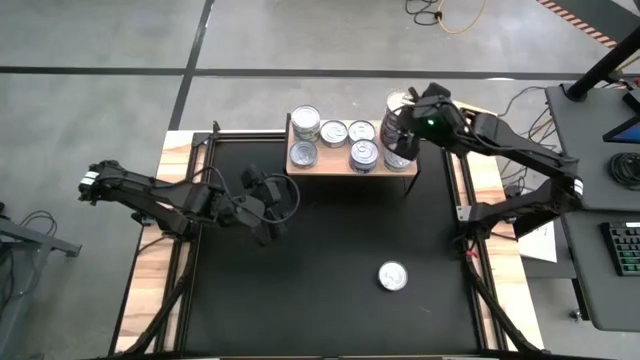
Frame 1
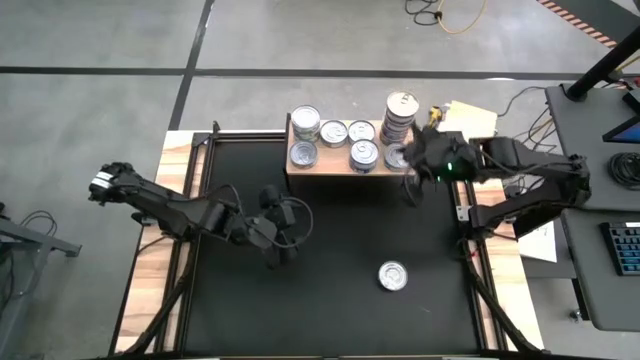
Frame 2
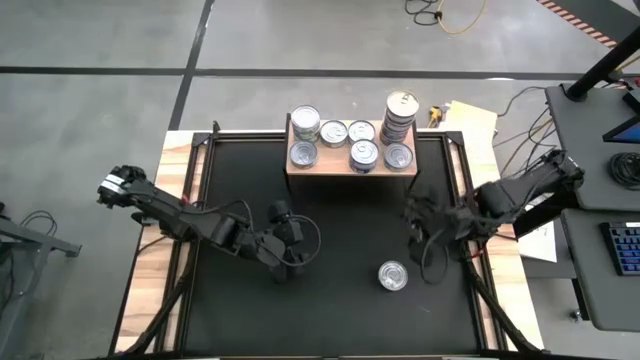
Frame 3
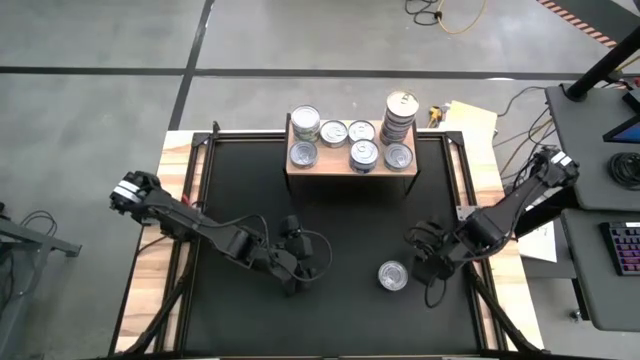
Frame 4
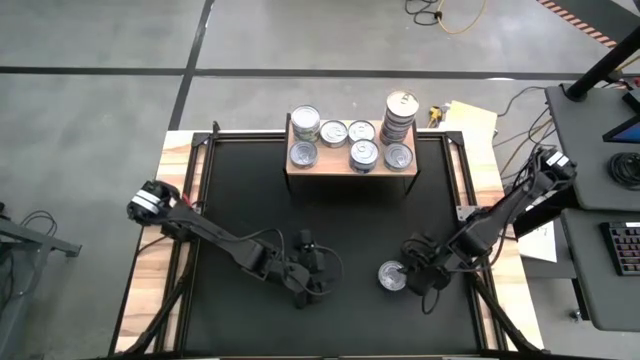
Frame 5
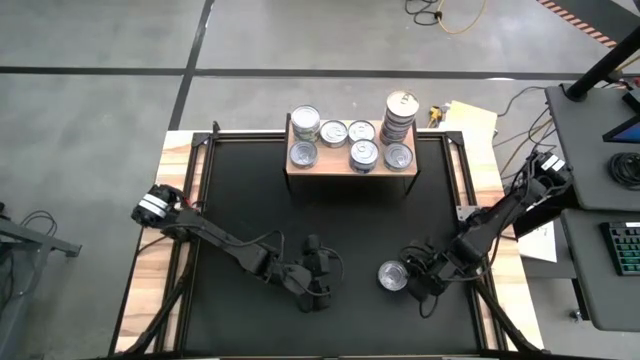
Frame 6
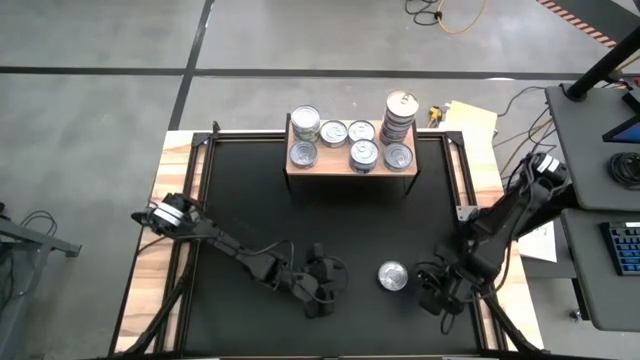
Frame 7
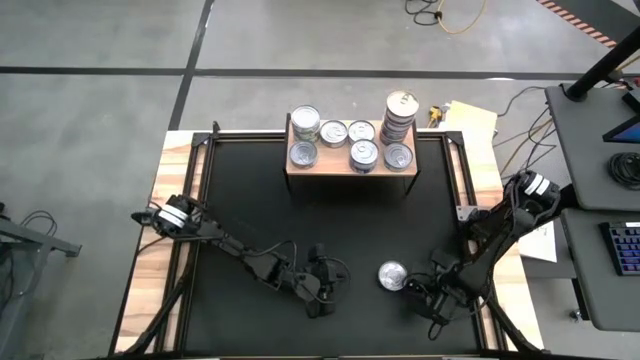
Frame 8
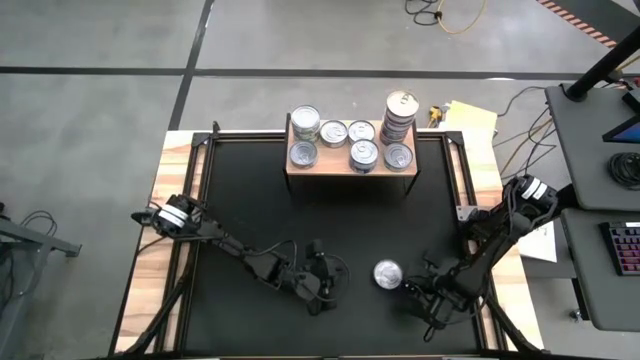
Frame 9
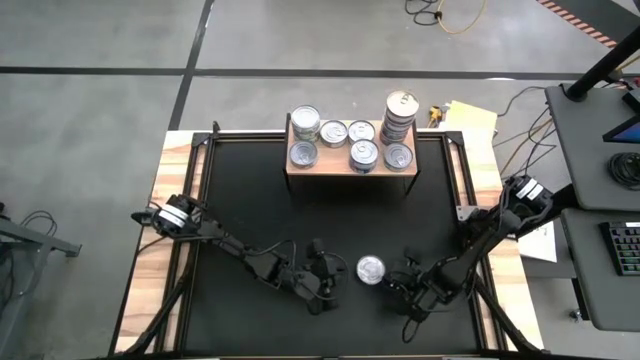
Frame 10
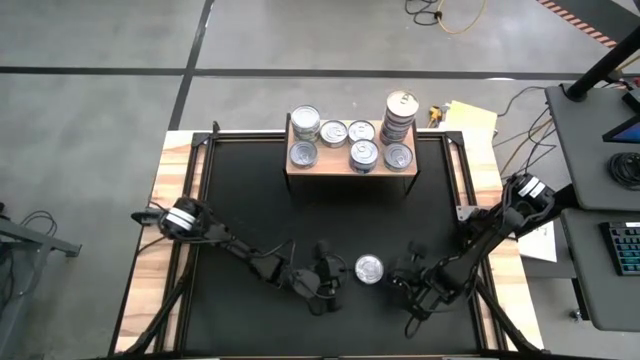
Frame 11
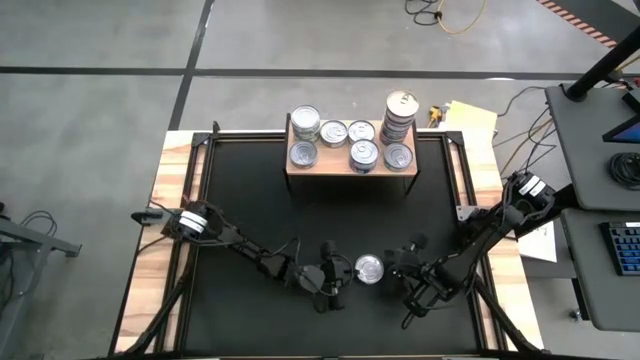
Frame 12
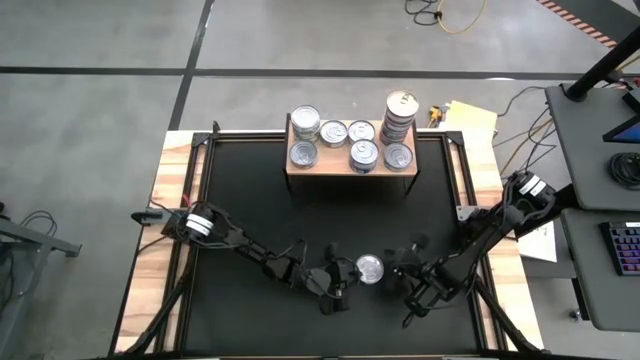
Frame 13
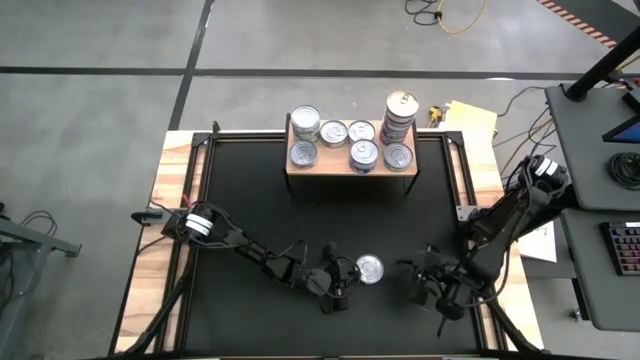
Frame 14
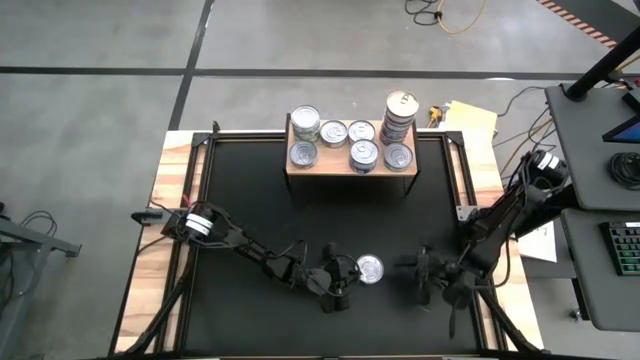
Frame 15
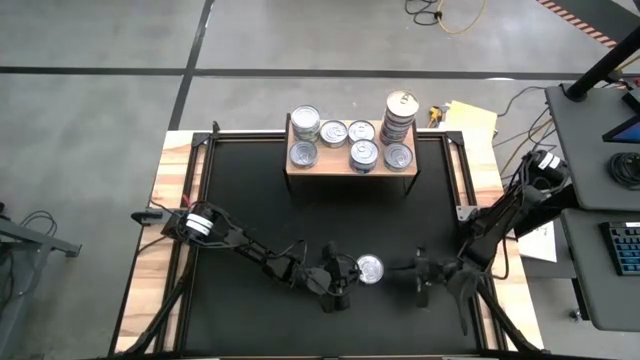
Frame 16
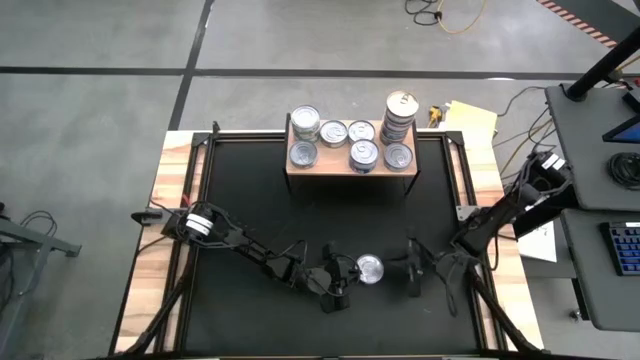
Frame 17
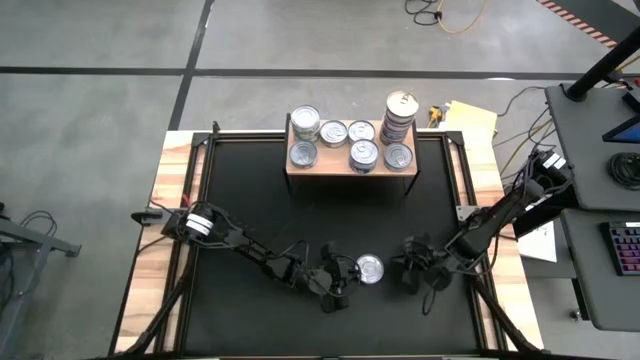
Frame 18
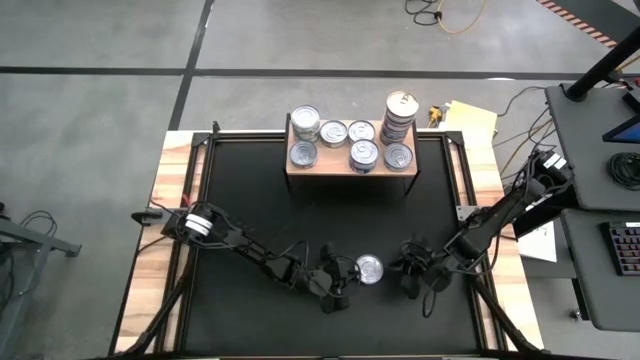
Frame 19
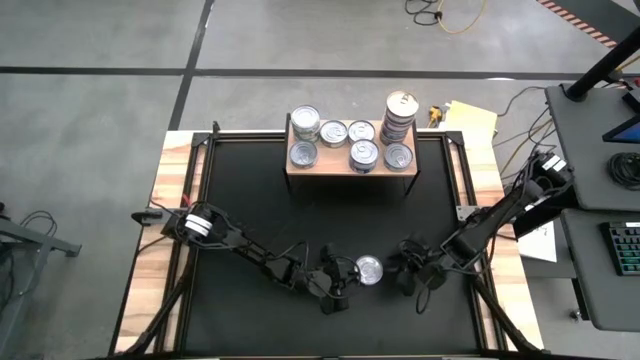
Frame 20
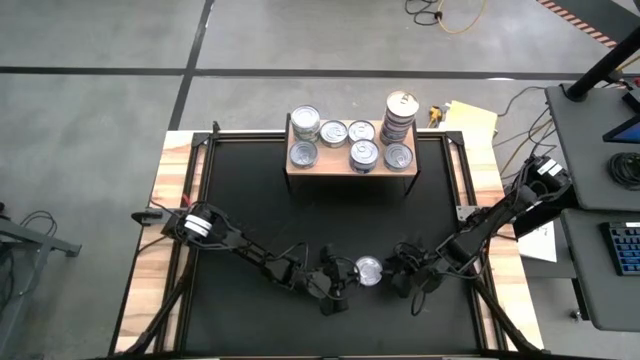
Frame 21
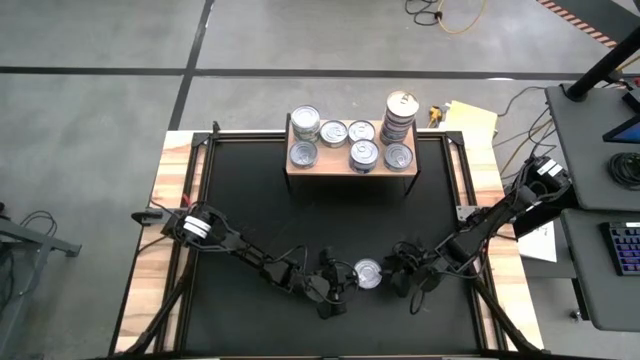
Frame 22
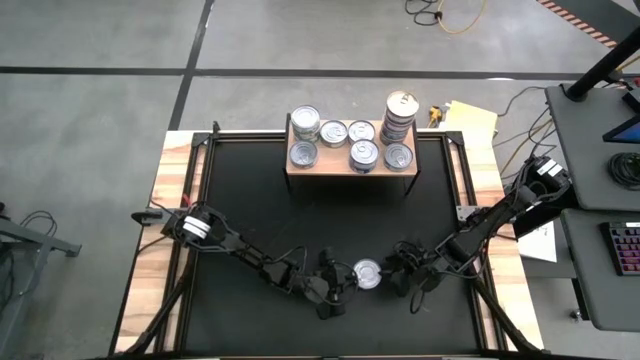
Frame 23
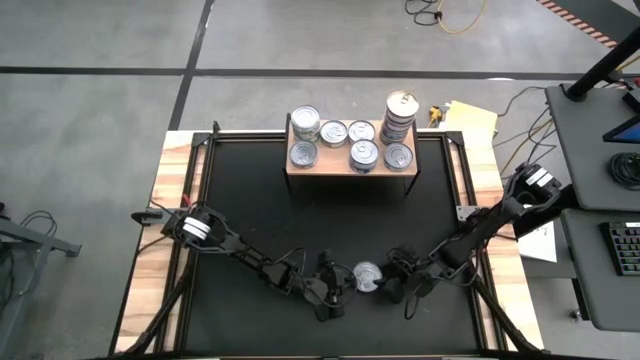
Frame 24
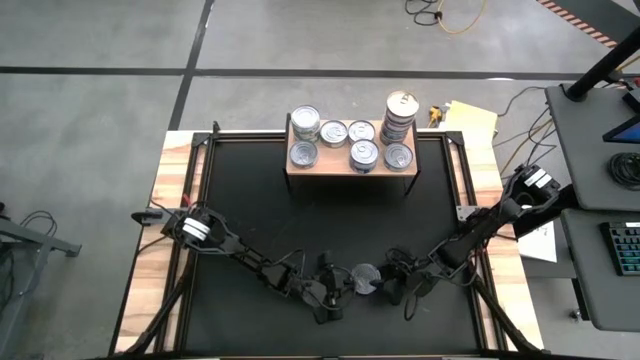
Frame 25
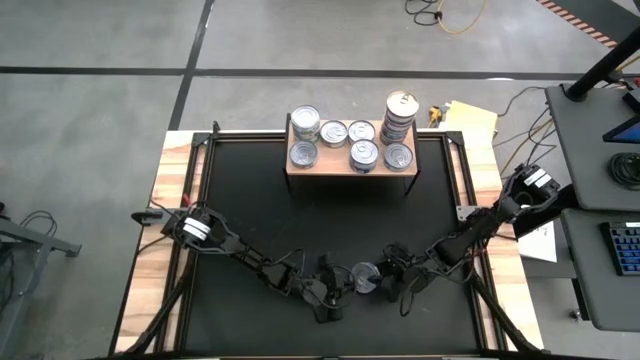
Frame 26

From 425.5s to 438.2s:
Task: Stack canned seafood by type on shelf
Stack the blue tuna can on top of the blue tuna can on the shelf

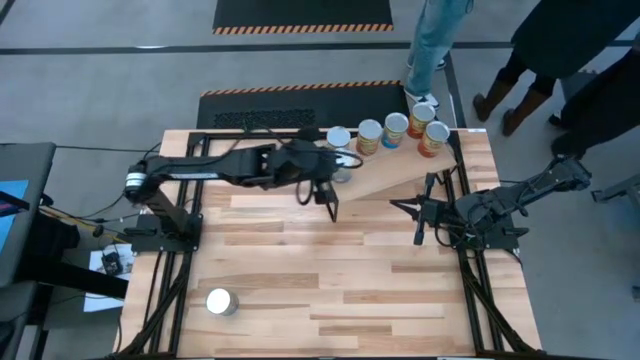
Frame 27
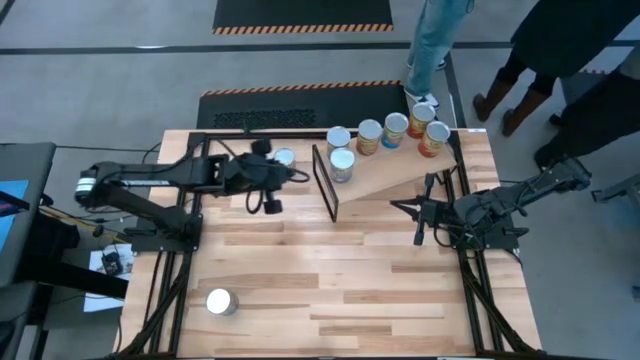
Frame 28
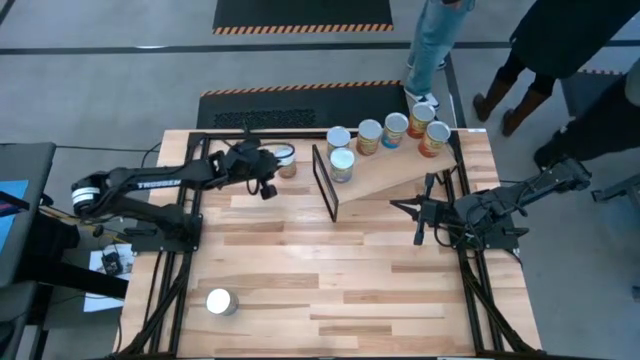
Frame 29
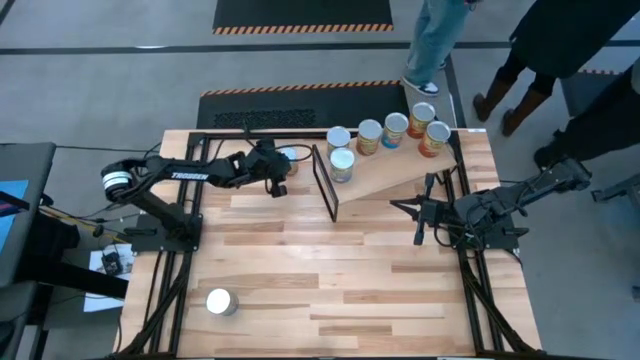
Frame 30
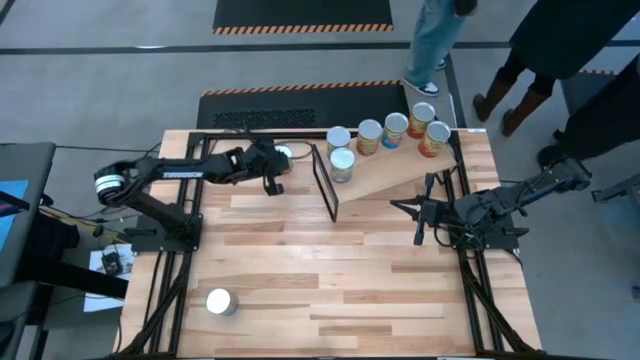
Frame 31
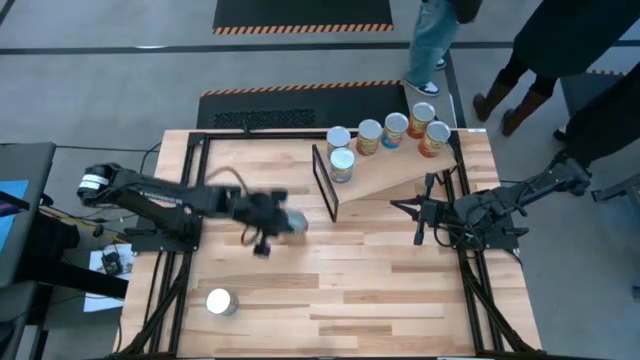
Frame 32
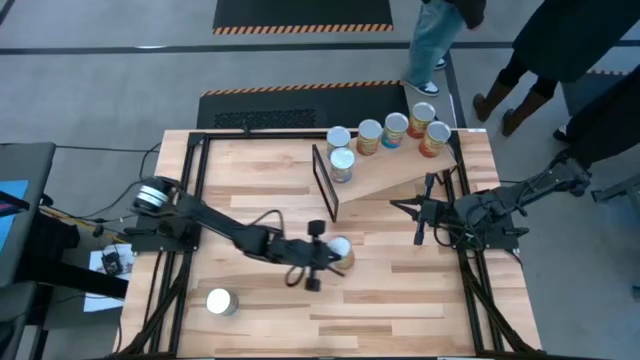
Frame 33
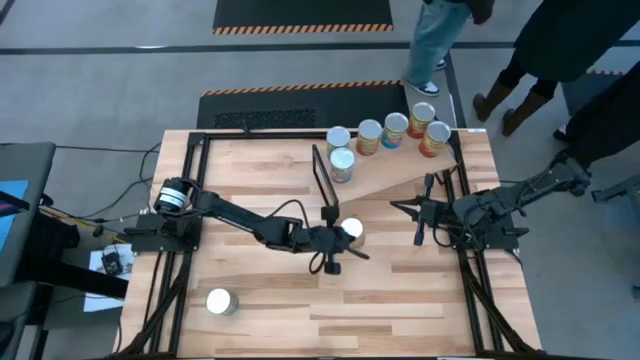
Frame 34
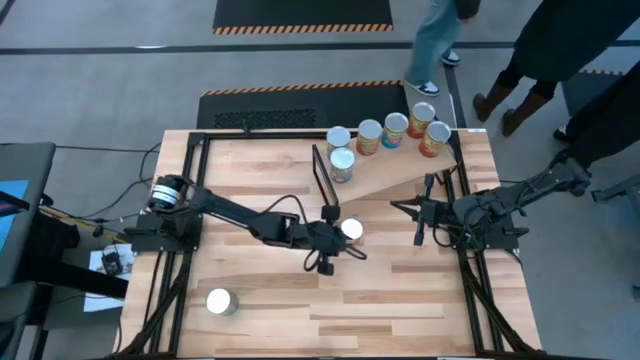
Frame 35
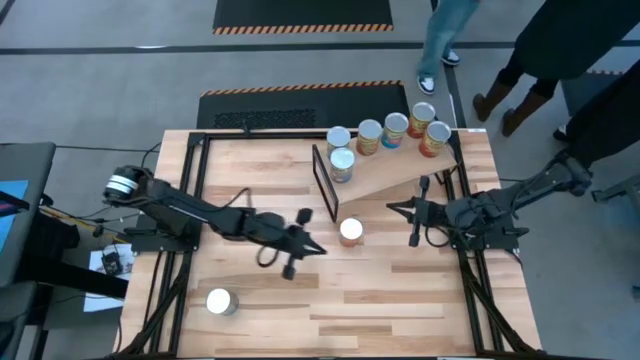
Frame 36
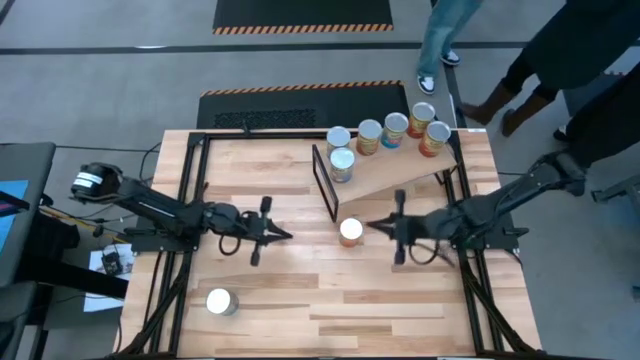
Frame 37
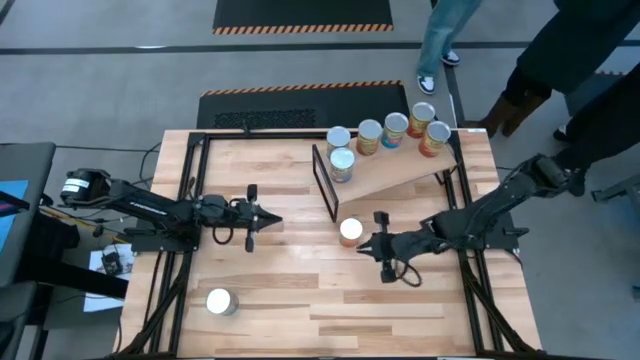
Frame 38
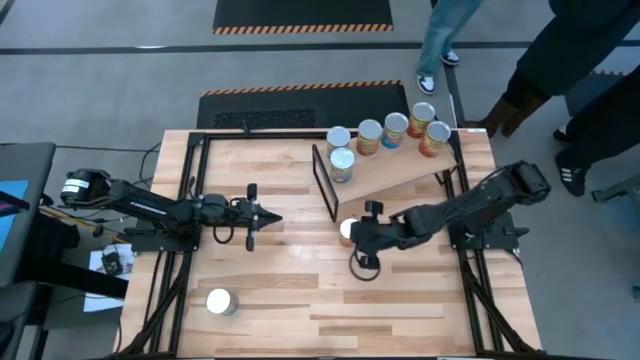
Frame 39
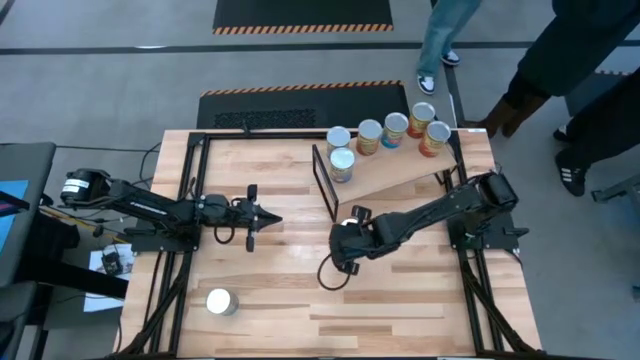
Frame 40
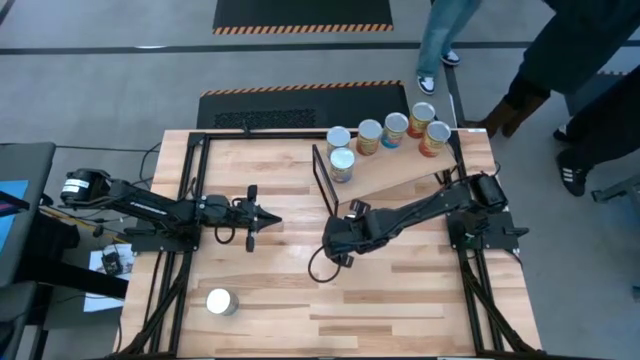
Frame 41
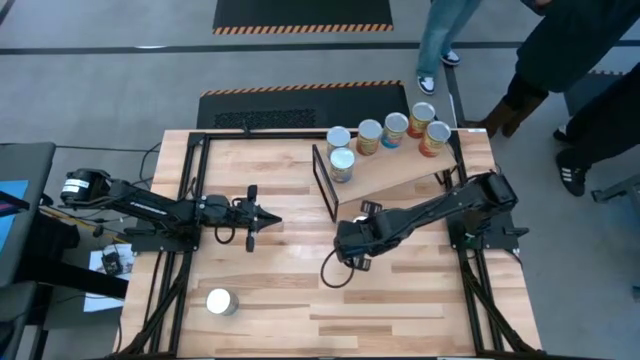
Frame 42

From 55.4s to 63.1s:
Task: Pick and place cans onto a shelf
Put the canned green beans aligned with the other canned green beans on the shelf
